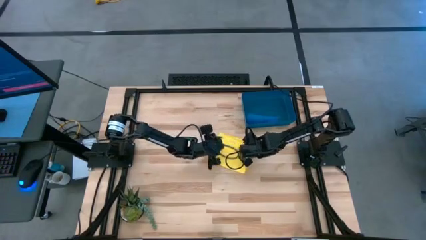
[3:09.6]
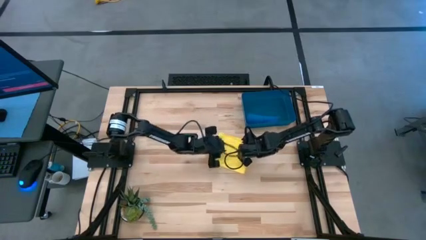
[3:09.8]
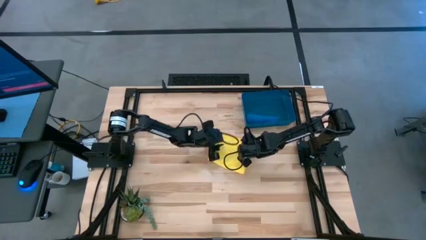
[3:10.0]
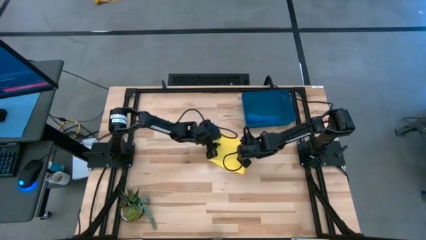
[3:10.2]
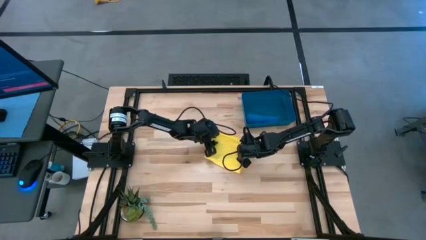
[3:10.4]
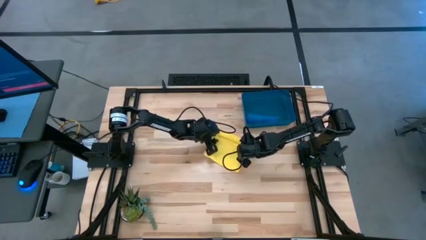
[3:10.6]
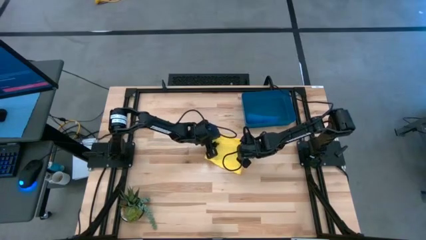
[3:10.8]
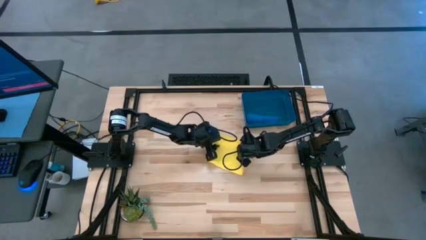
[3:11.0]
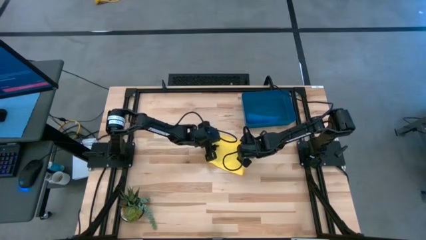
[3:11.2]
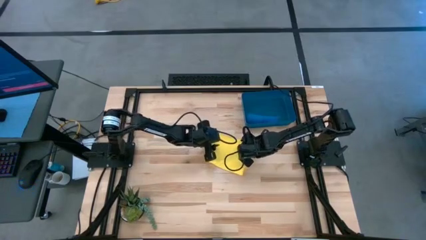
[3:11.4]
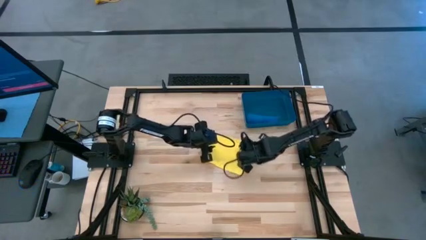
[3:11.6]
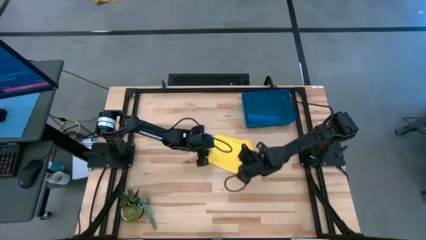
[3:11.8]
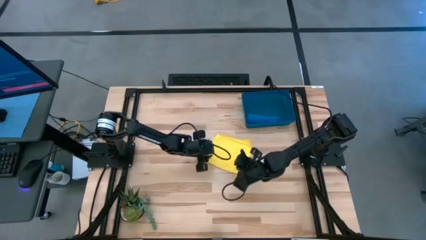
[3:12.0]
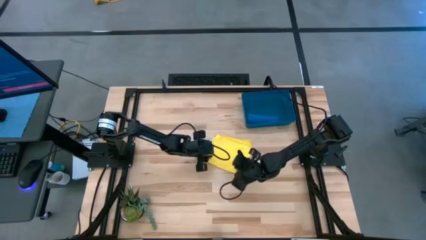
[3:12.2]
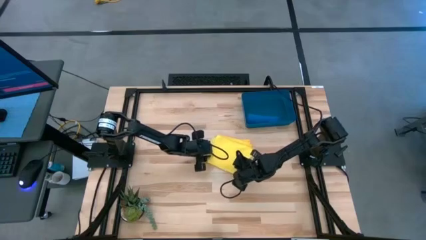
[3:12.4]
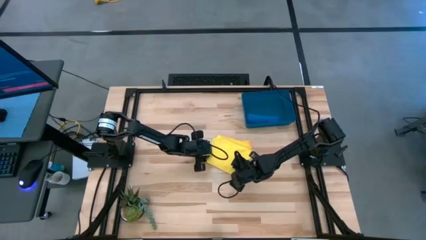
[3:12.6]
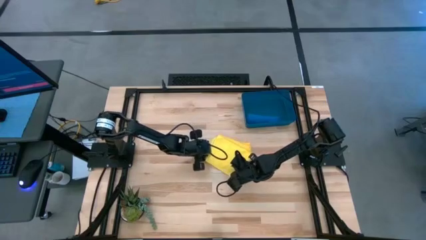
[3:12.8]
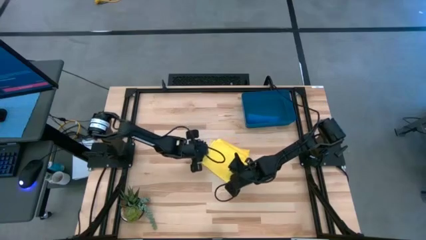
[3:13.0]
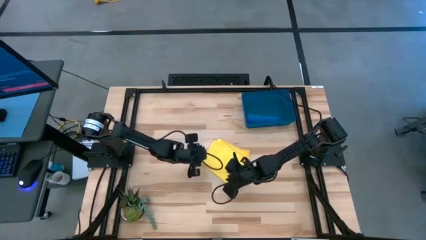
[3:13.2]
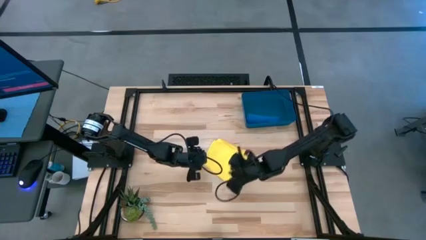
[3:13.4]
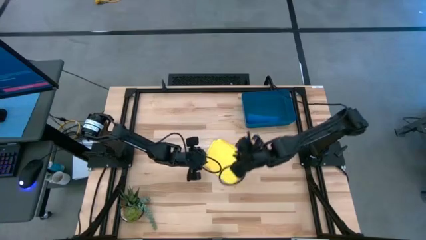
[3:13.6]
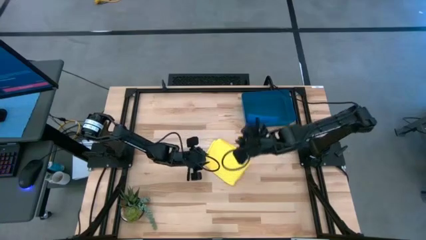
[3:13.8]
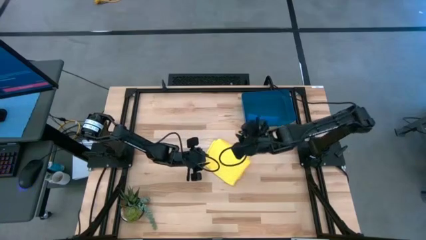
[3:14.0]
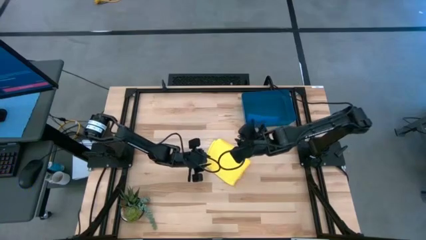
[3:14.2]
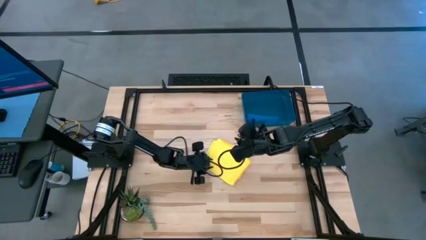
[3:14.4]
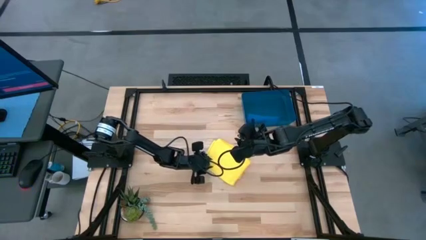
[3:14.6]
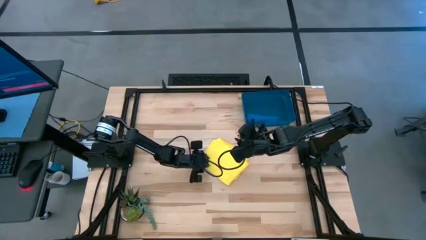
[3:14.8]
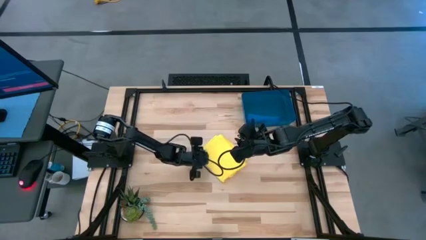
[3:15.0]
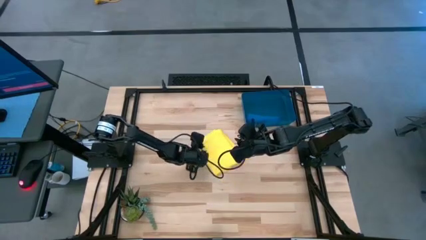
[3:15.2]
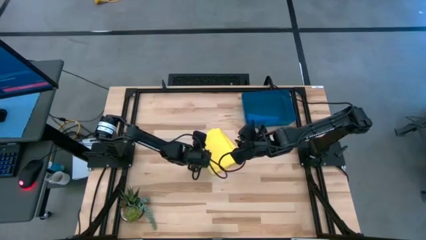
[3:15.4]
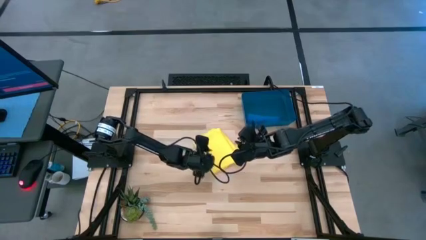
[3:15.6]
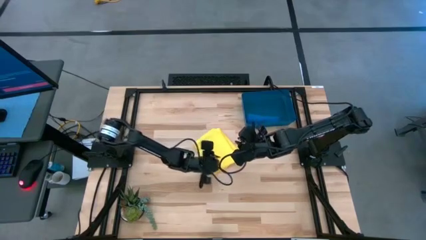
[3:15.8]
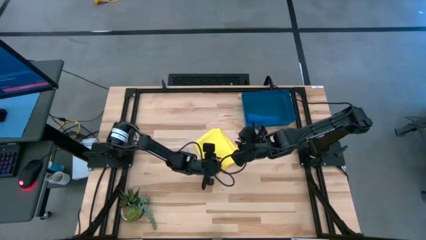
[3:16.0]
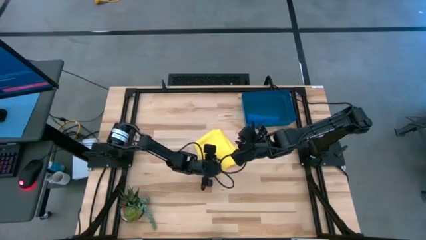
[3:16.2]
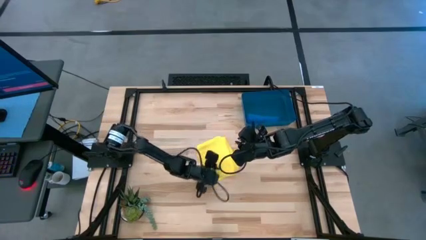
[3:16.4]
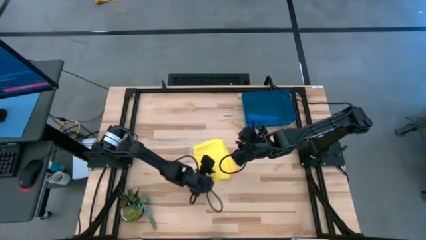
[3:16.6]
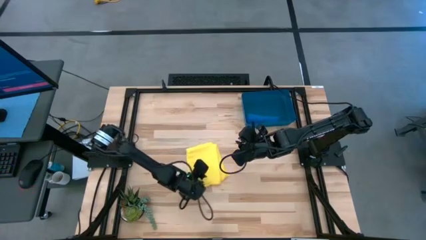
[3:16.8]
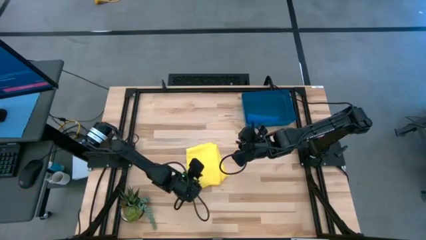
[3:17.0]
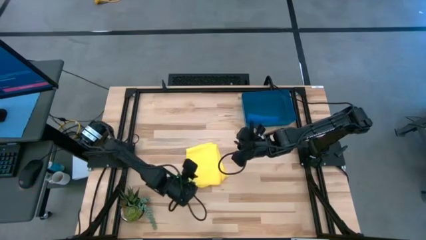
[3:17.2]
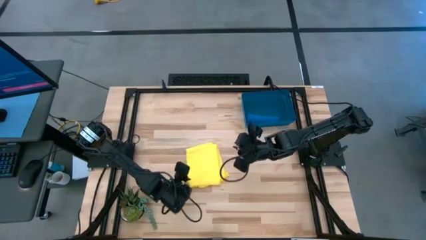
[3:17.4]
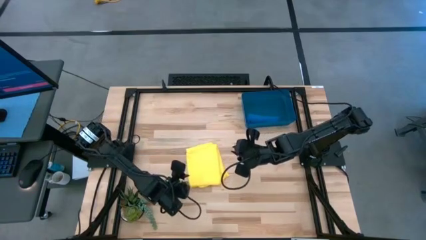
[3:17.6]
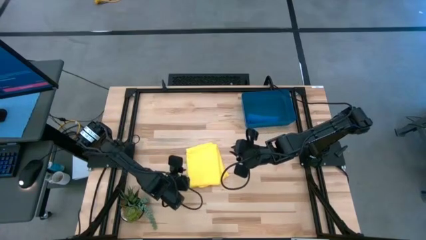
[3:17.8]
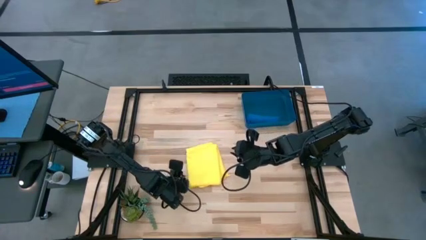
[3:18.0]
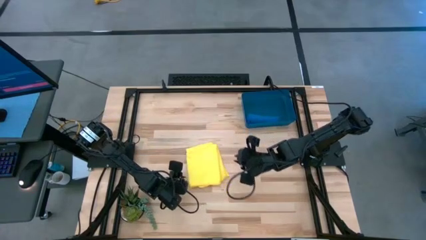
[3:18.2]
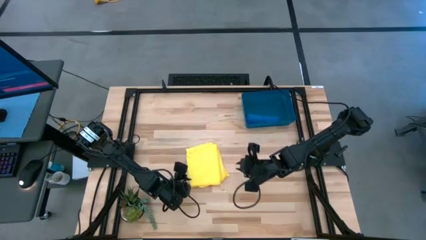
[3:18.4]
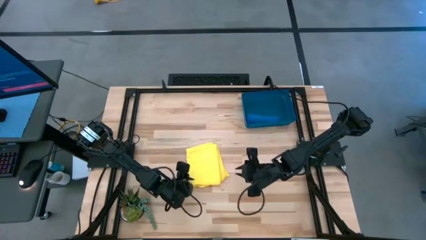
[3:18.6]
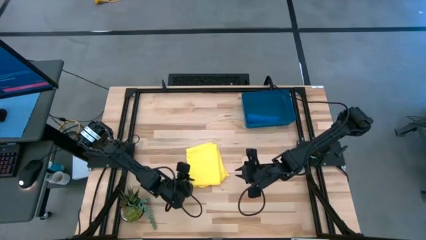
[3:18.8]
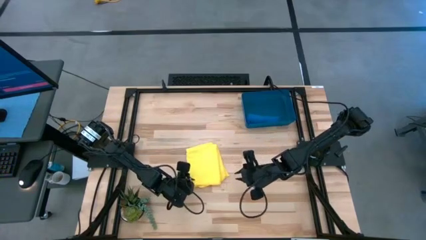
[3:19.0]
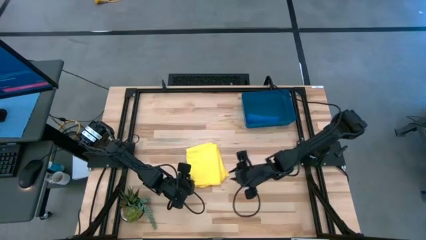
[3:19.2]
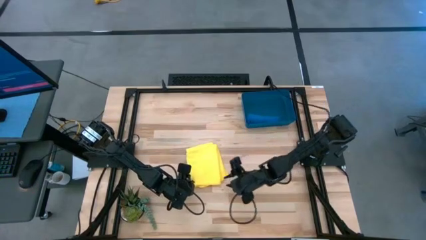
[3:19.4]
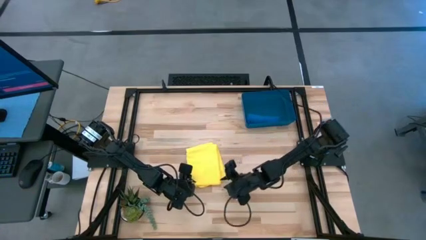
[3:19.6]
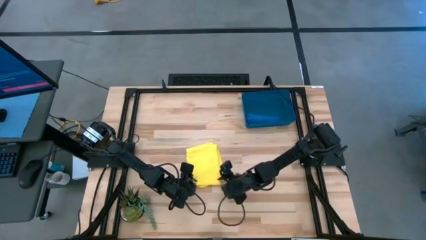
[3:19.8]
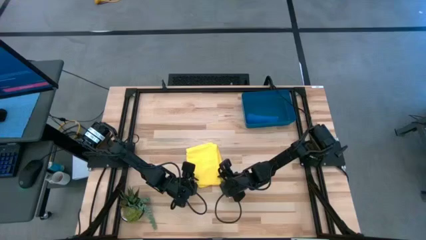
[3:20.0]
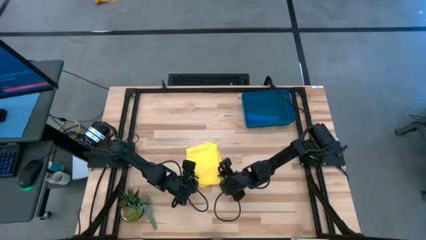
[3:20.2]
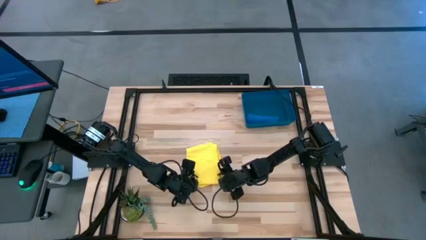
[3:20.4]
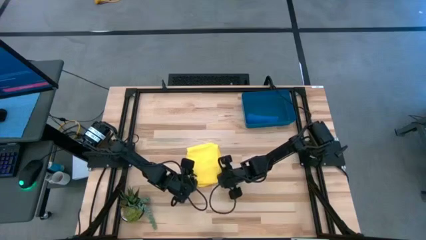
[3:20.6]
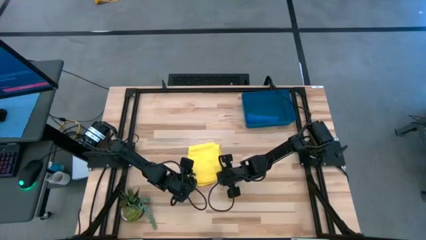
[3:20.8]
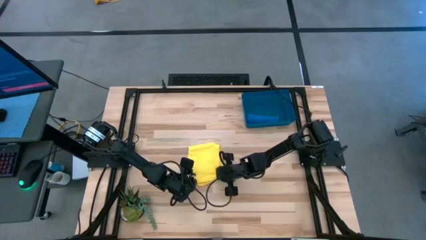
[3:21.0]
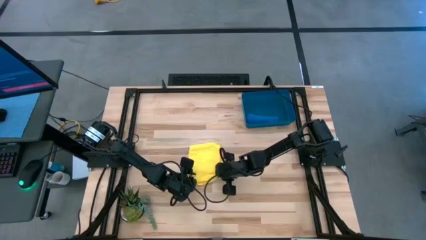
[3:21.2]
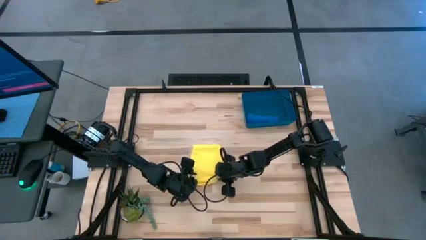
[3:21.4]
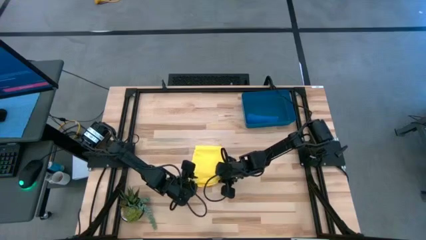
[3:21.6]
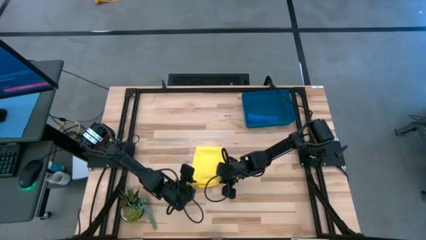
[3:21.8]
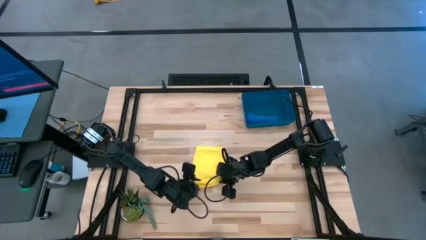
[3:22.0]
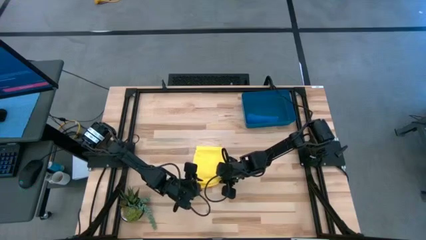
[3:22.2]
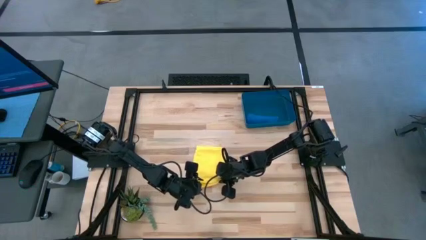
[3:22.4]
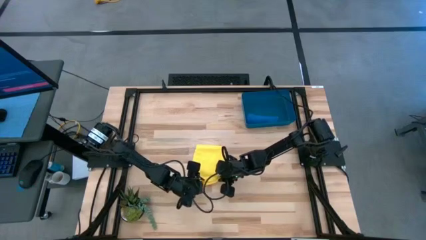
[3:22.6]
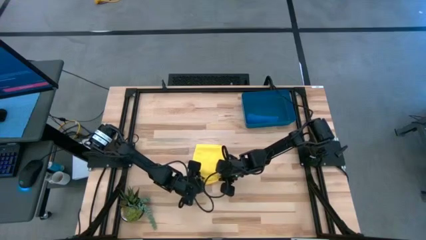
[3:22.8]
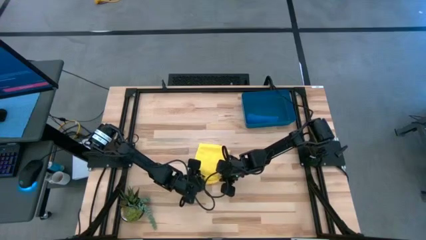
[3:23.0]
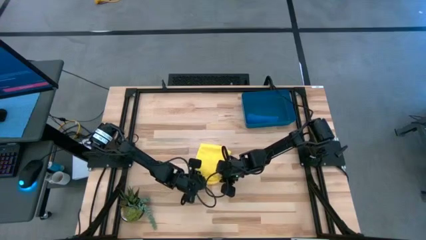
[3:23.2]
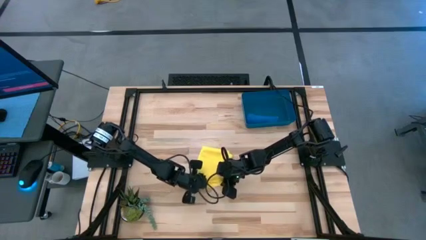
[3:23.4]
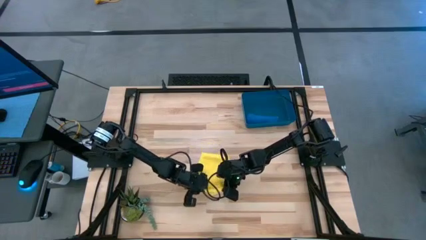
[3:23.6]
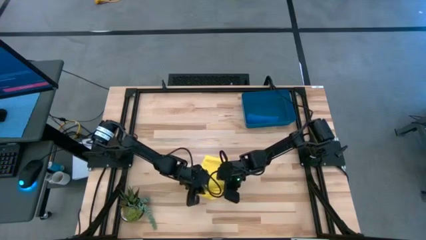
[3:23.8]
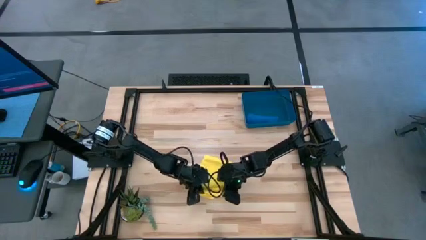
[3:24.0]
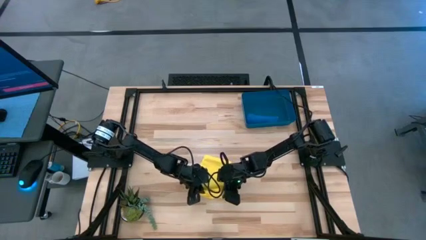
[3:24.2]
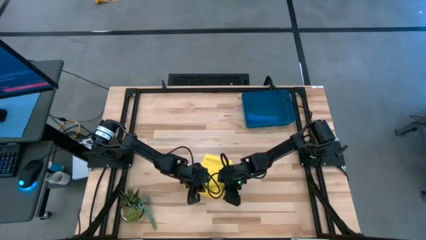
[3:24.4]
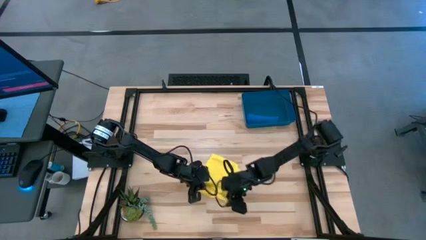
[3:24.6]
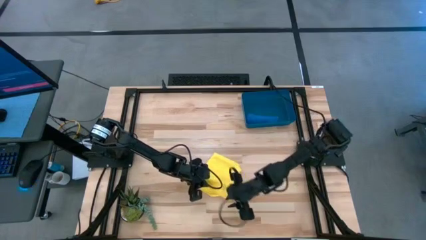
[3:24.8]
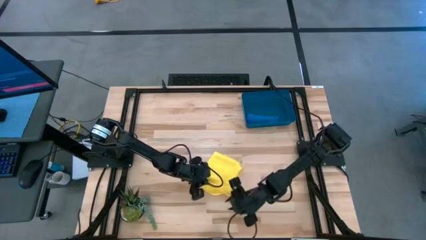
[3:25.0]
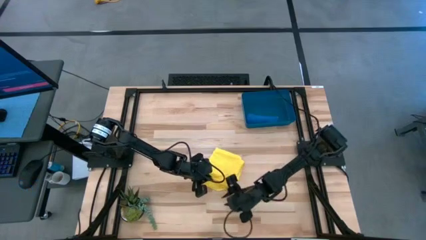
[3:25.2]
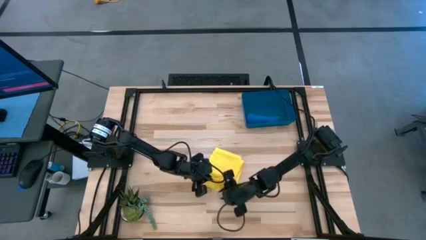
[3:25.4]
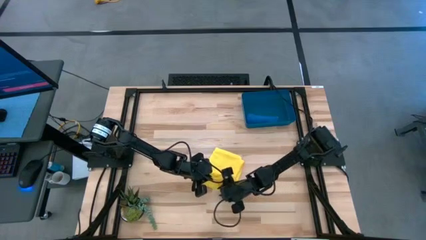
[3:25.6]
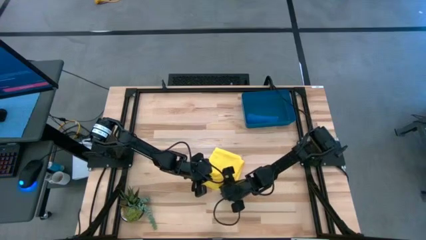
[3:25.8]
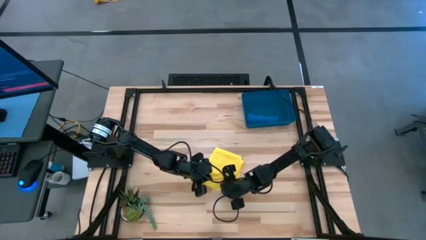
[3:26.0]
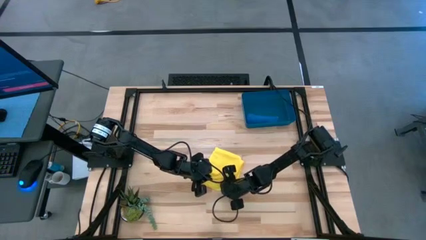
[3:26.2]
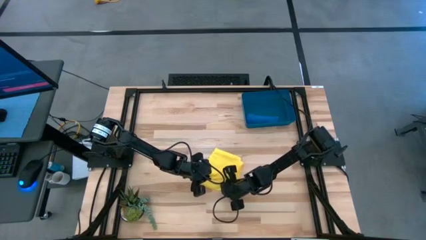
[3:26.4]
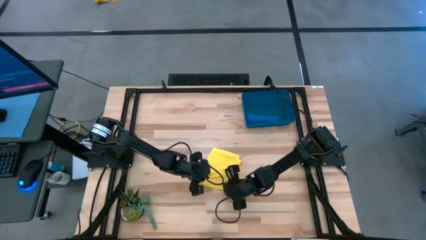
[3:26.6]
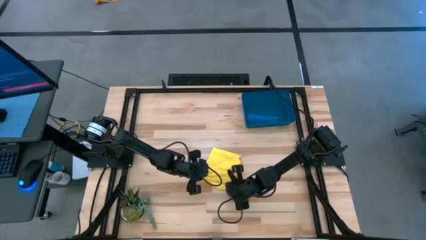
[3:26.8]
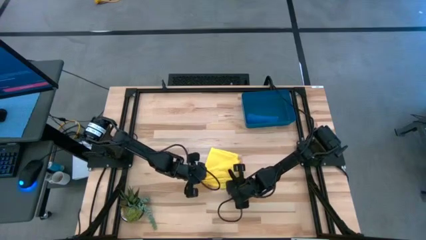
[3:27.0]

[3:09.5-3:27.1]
Task: Roll microfiber towels into tight, uniform cylinder then place into a basket
Roll the yellow microfiber cloth
